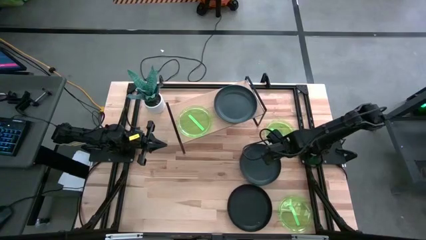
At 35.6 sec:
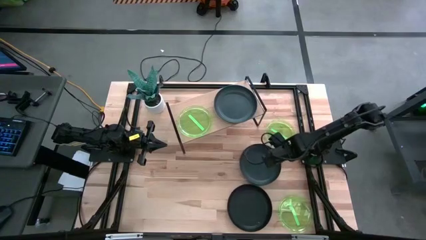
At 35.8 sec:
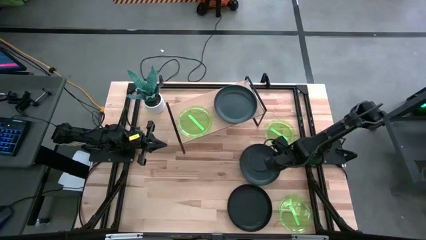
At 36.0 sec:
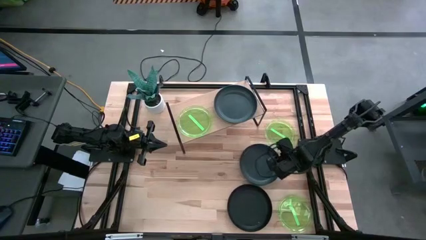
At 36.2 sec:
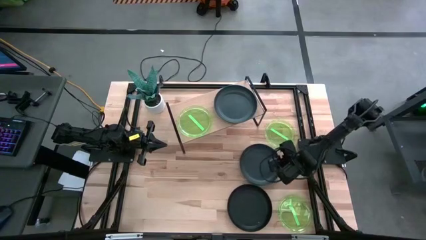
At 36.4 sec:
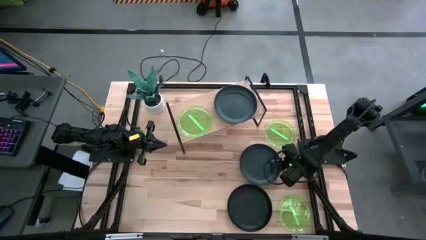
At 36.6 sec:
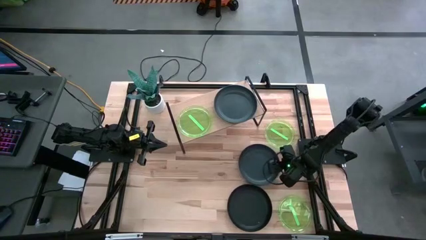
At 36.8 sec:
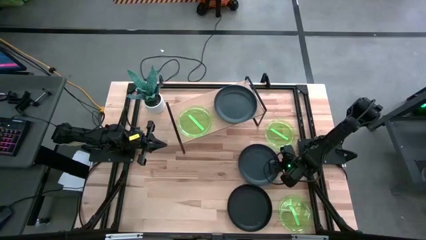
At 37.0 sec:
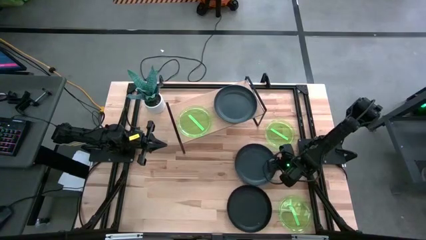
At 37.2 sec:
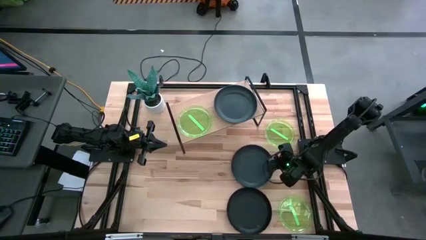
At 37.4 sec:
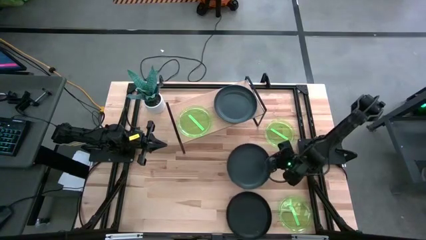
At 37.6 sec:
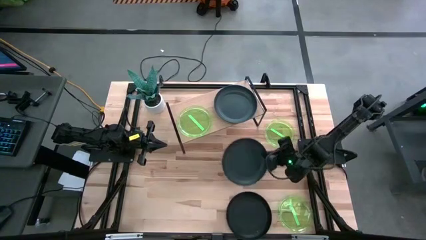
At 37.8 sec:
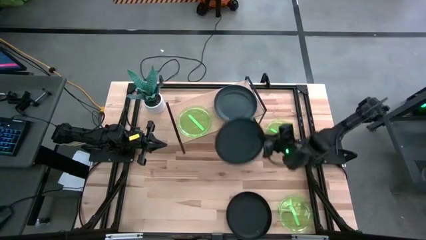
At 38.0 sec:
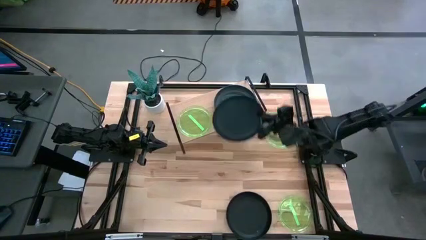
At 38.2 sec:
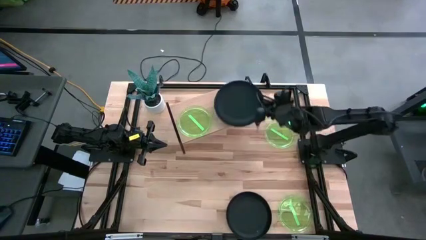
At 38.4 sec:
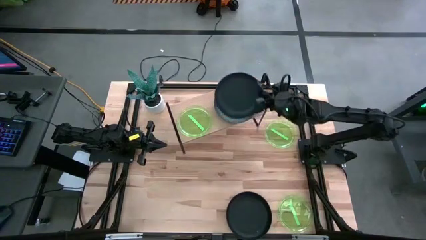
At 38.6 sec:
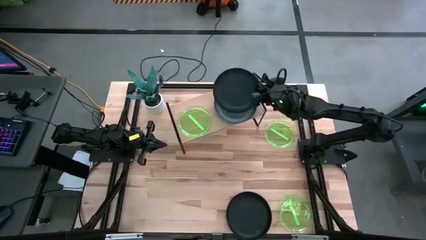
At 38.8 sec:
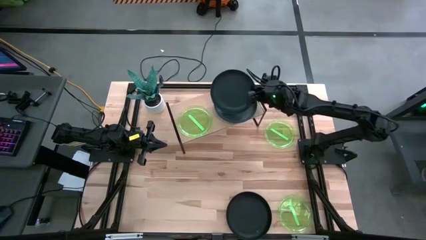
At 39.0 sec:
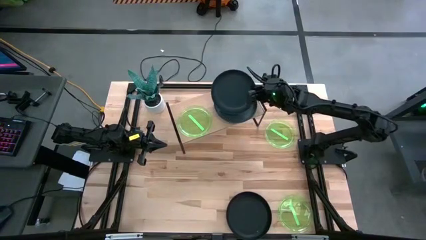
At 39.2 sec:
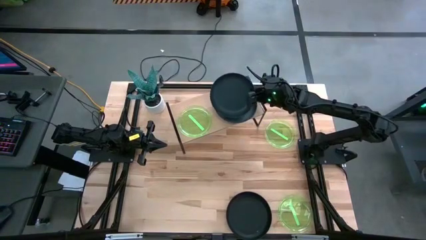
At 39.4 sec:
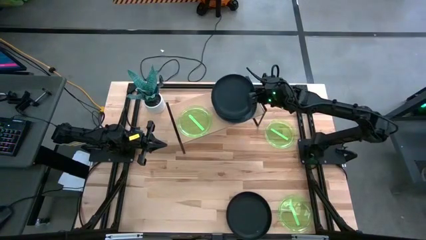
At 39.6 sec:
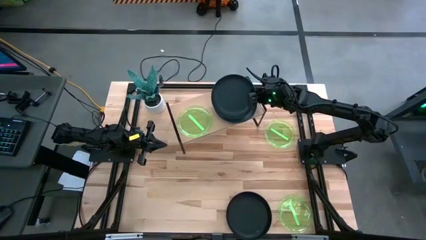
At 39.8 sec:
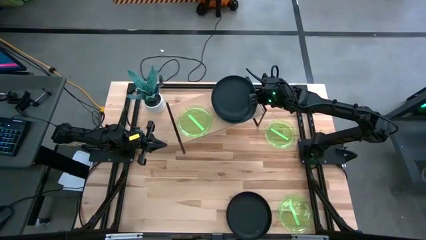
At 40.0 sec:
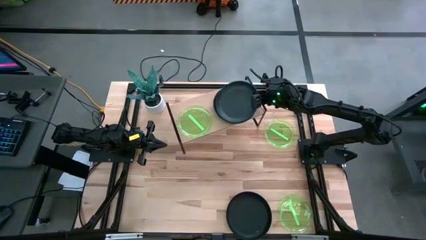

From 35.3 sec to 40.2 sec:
Task: Place and stack plates onto a shelf
Stack the top black plate on top of the black plate on the shelf

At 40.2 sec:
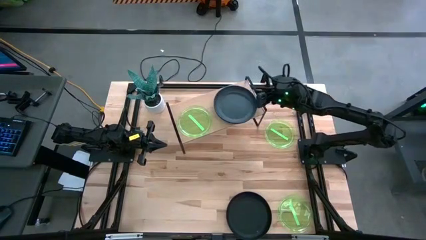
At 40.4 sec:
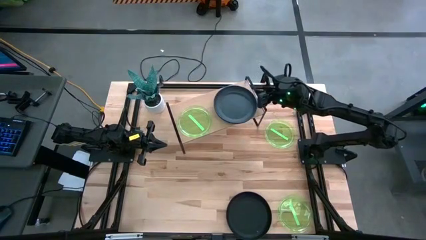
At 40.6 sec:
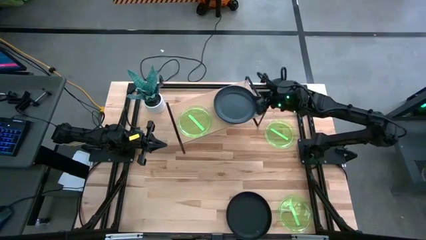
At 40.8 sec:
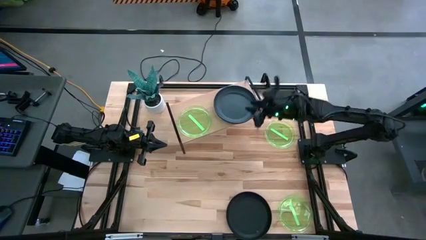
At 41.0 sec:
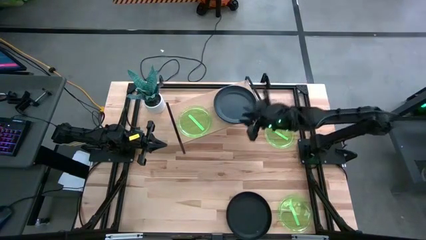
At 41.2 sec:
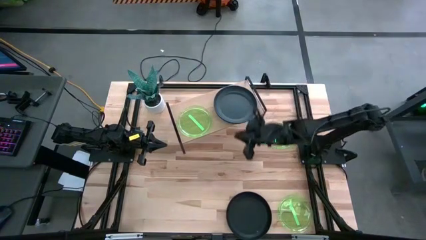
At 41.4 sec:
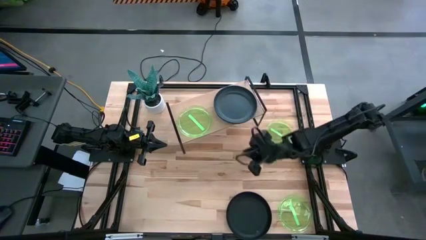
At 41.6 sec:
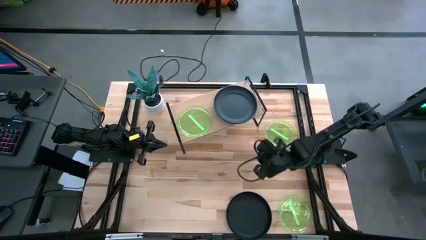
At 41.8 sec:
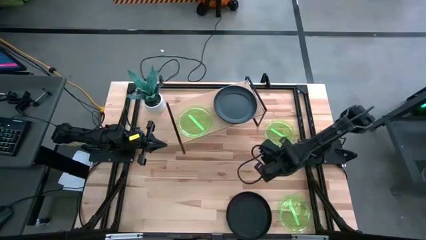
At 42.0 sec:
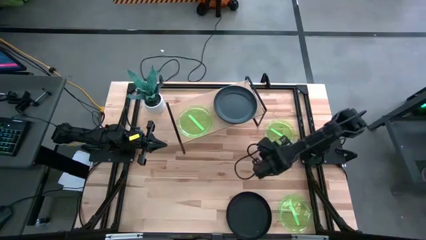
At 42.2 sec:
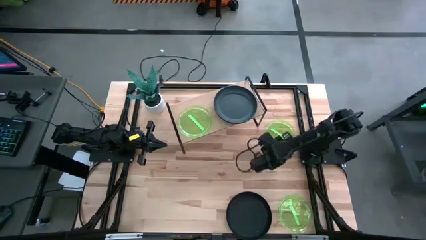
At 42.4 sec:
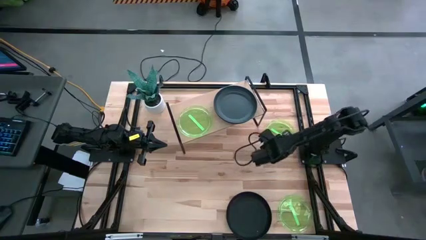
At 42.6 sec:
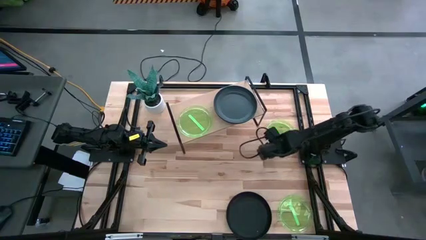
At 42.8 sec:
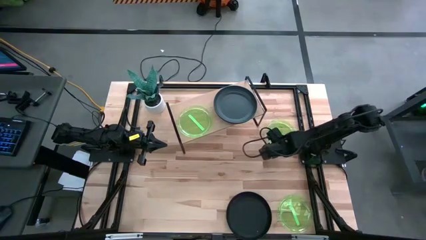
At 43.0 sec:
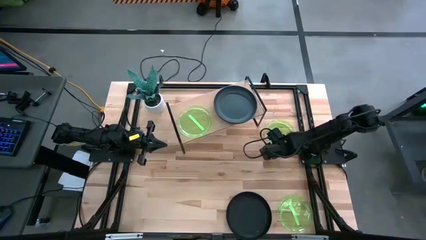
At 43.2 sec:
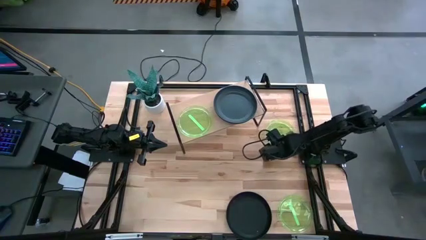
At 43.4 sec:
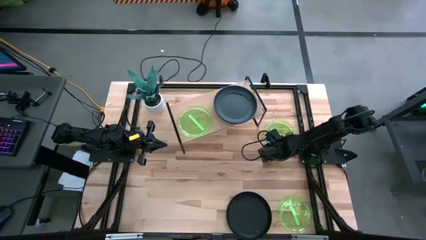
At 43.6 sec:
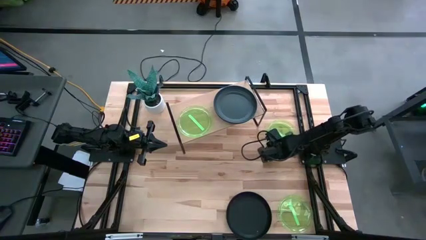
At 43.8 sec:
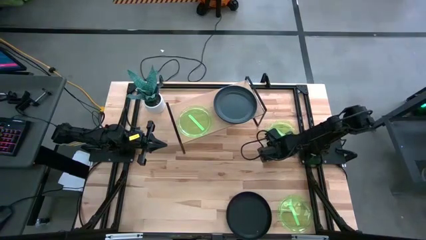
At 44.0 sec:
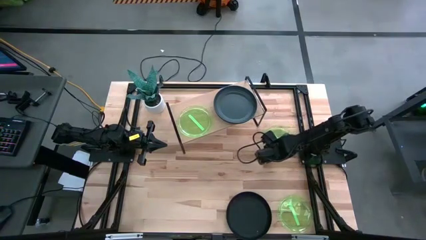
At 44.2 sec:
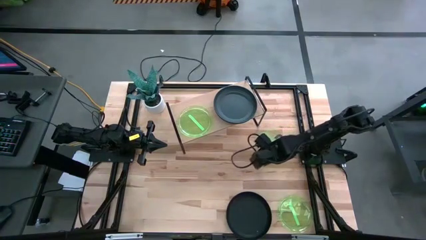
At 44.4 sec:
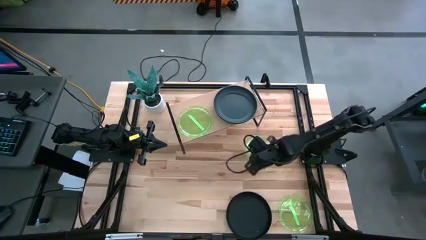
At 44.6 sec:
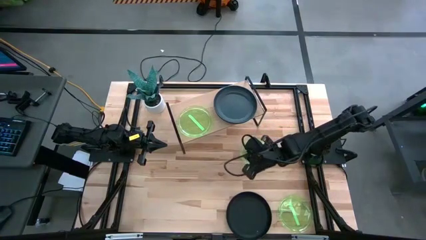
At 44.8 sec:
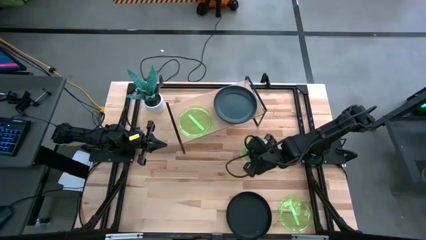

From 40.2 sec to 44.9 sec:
Stack the top green plate on top of the green plate on the shelf

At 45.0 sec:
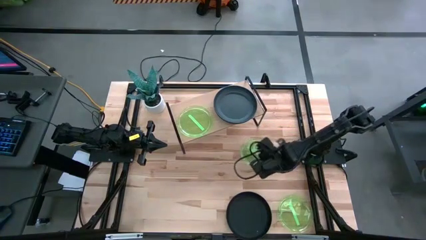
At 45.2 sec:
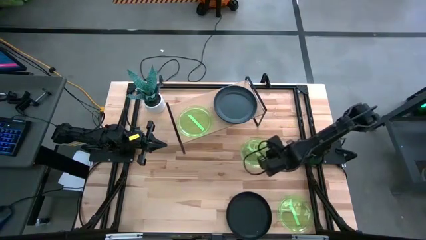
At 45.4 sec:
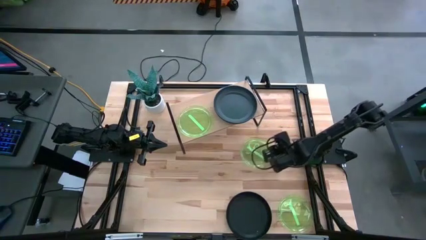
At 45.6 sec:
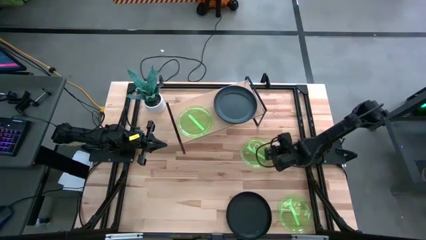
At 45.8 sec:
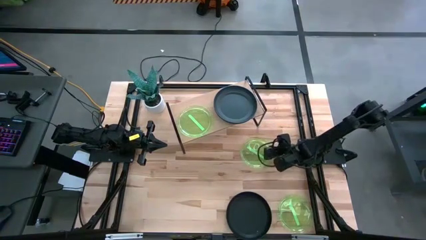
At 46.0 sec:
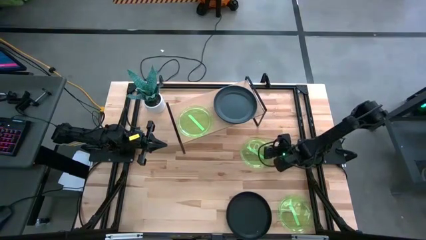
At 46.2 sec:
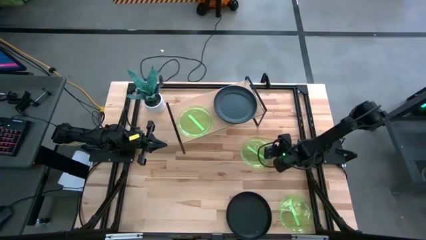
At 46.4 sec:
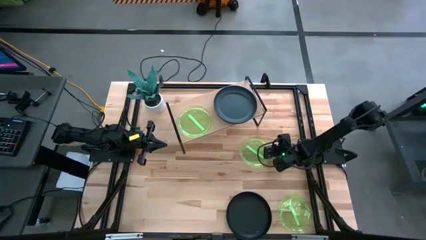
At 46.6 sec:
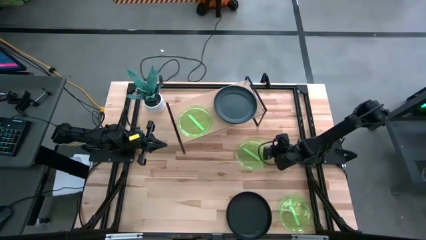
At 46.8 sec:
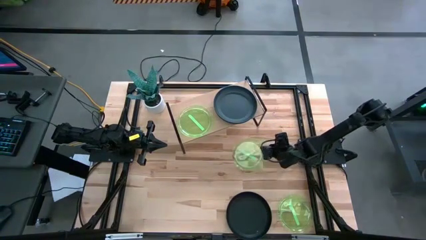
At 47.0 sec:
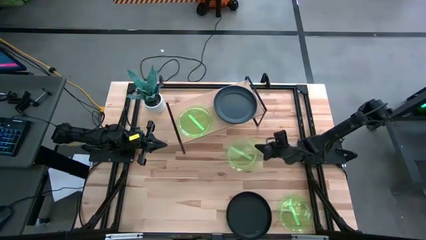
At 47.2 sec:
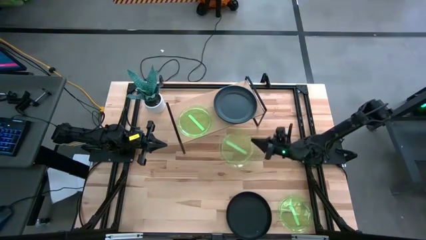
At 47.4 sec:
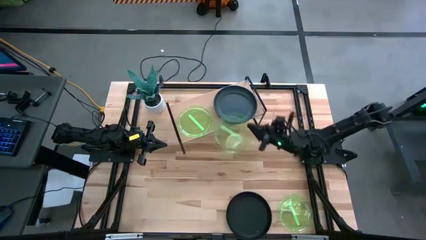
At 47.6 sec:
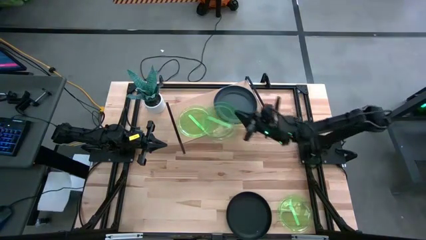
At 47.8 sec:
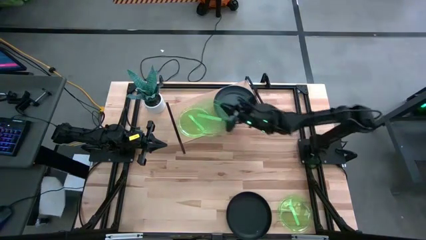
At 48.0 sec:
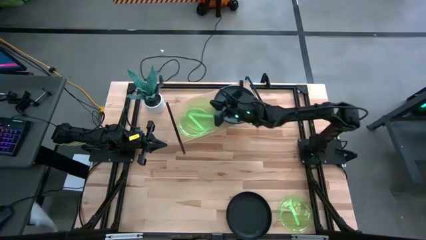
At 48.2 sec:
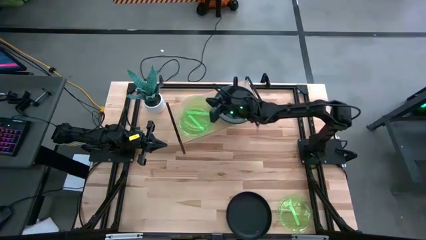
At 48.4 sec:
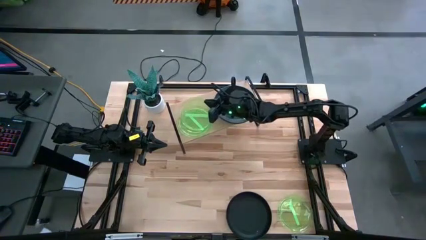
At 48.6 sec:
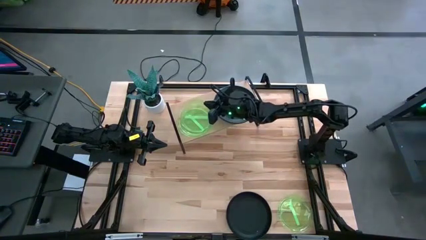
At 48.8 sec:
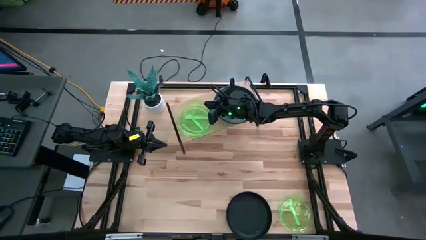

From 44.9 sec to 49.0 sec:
Stack the top green plate on top of the green plate on the shelf

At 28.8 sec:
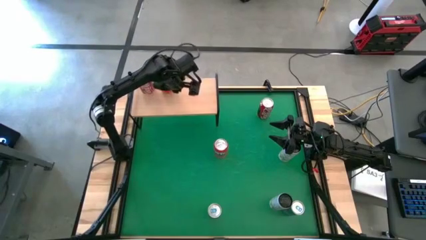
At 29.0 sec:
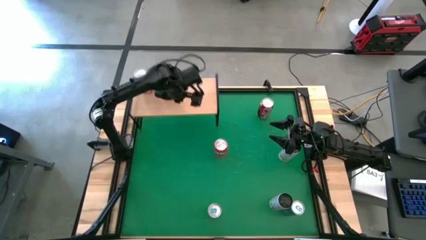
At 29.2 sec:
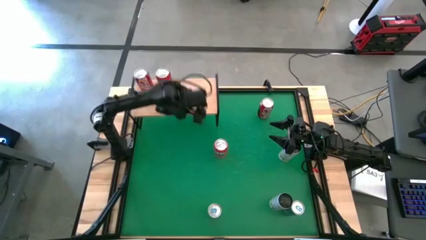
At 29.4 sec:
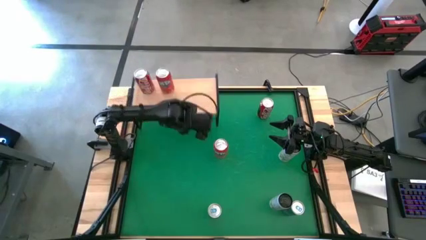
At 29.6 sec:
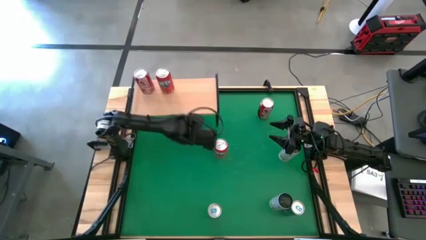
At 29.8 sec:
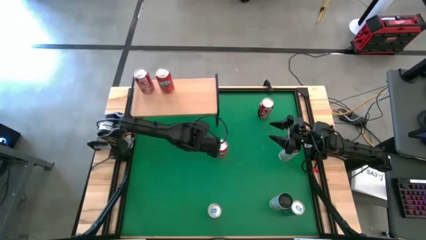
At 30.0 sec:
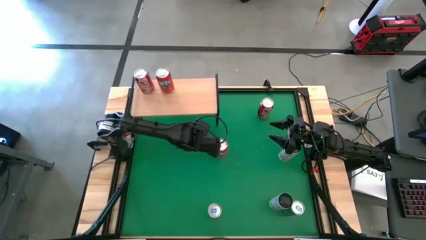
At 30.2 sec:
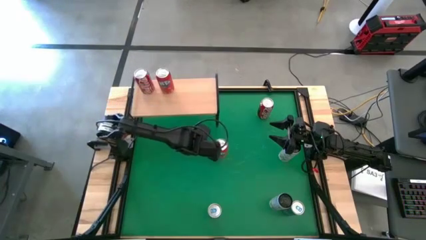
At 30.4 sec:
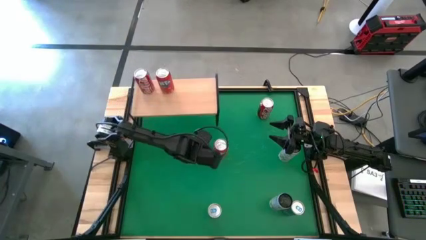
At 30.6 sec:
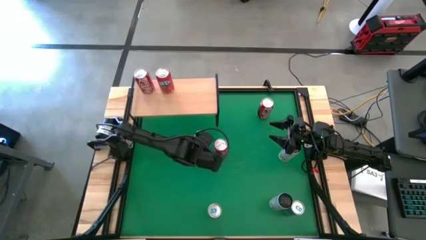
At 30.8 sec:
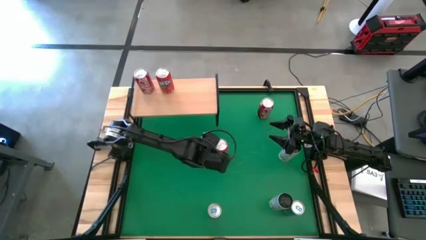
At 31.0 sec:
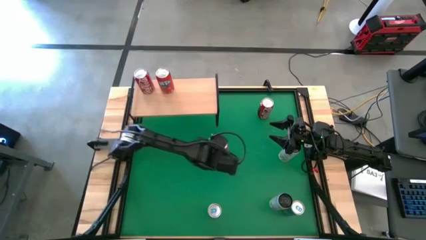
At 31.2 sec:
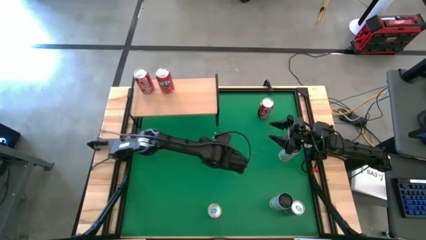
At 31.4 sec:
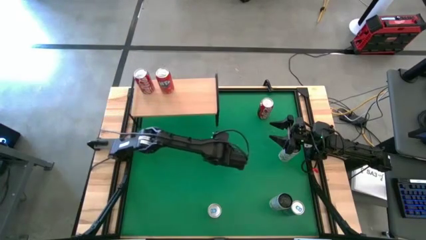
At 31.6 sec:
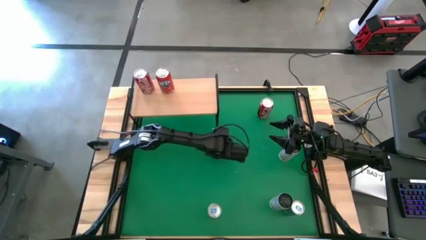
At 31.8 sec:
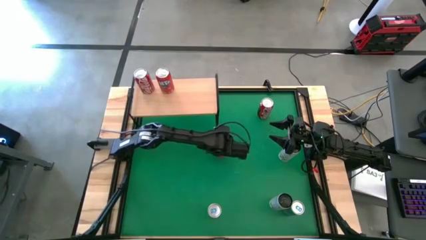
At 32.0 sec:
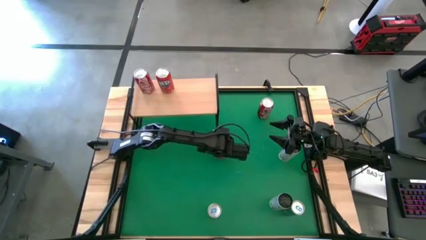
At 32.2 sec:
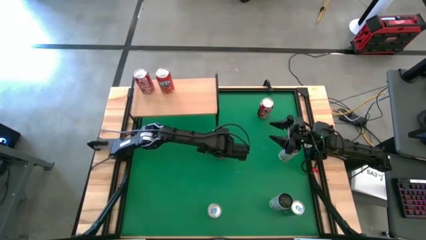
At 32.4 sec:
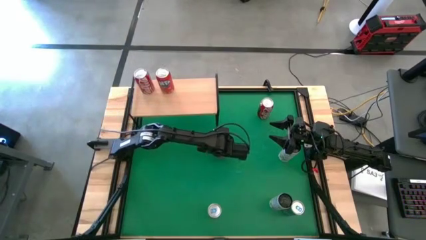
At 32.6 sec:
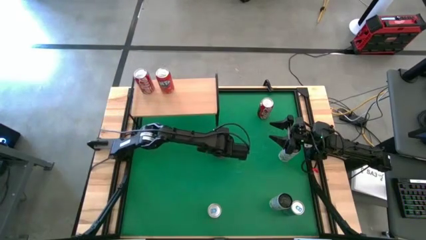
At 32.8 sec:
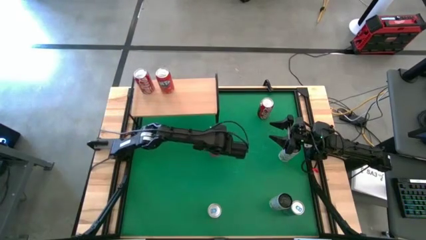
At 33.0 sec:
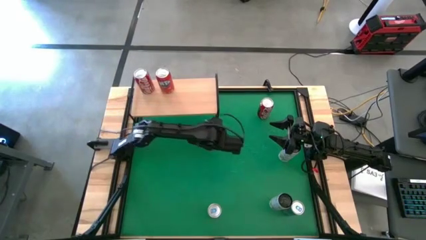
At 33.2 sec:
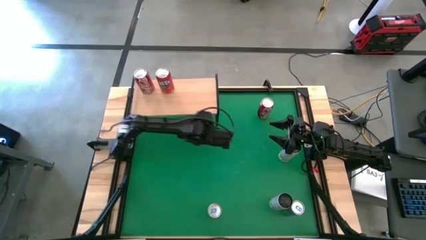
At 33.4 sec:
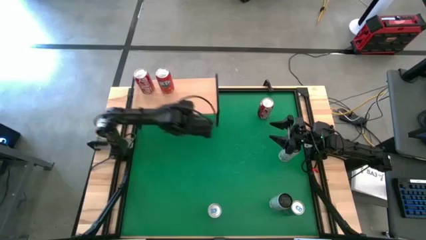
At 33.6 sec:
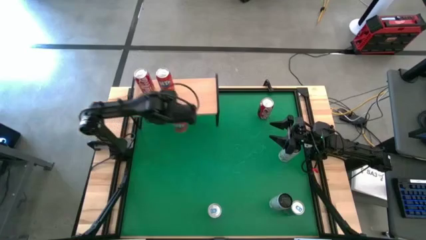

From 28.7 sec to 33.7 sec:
Task: Place canned beverage on shelf
Put the red soda can aligned with the other red soda can on the shelf
